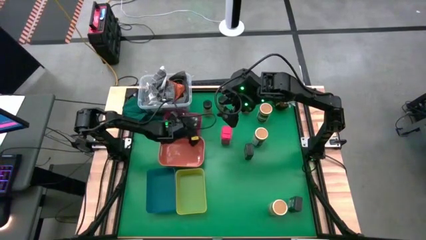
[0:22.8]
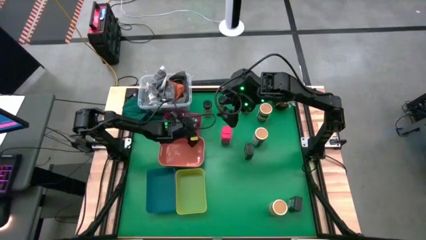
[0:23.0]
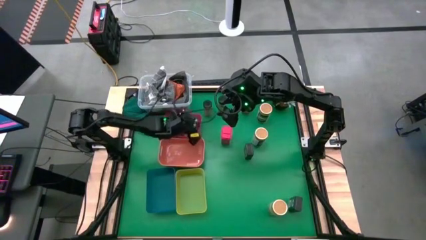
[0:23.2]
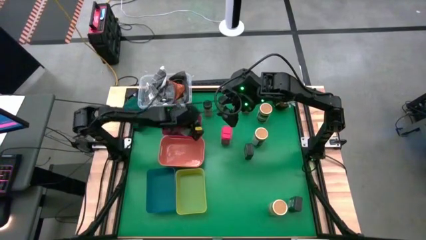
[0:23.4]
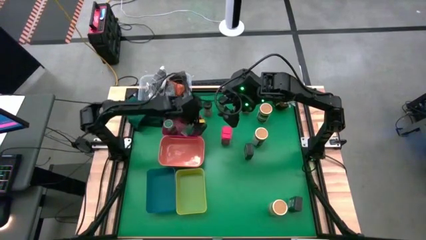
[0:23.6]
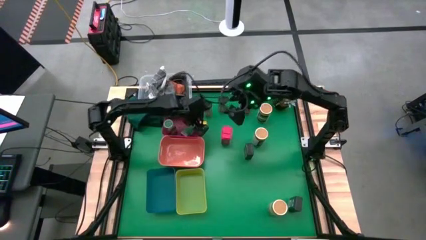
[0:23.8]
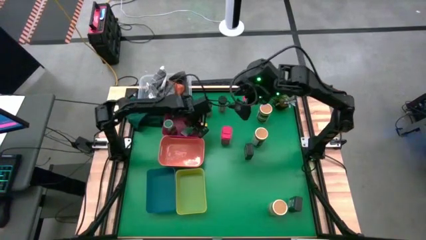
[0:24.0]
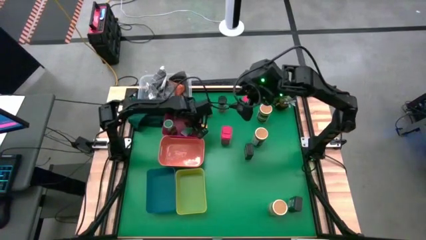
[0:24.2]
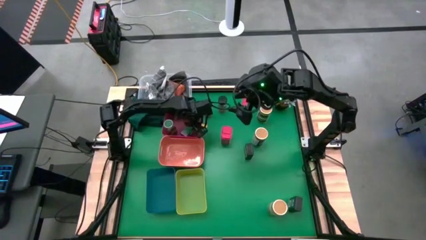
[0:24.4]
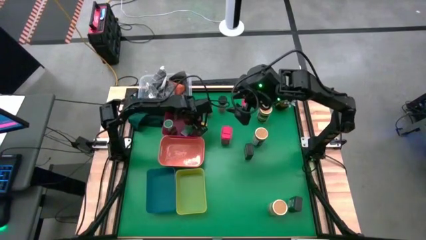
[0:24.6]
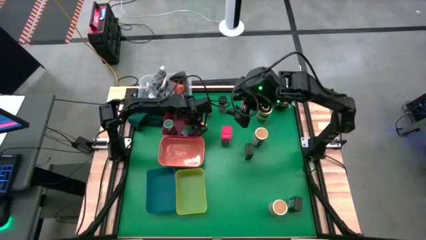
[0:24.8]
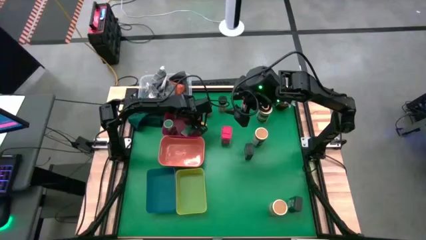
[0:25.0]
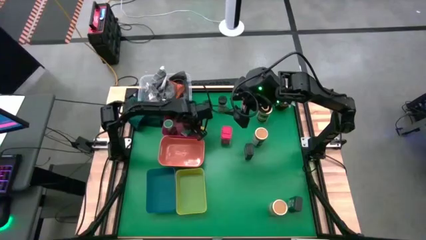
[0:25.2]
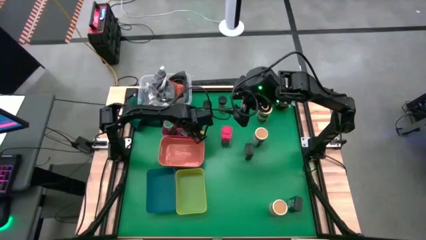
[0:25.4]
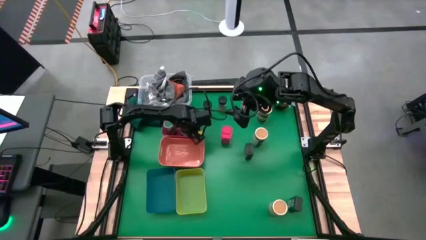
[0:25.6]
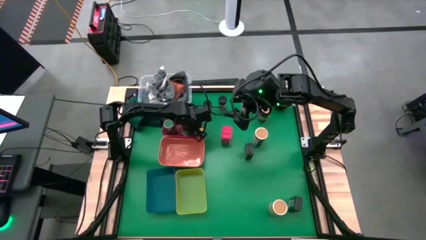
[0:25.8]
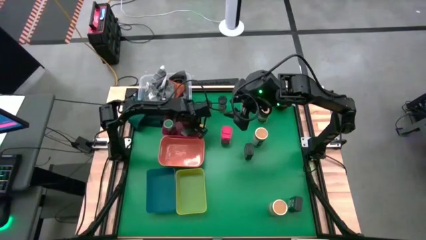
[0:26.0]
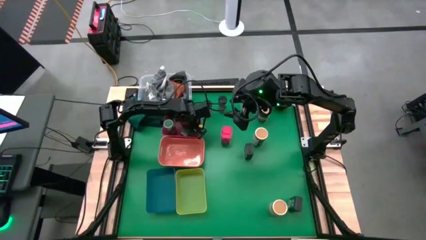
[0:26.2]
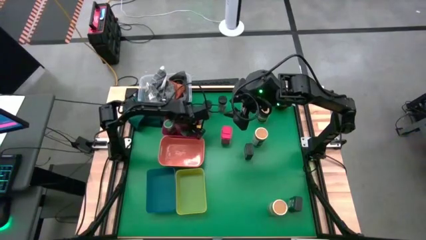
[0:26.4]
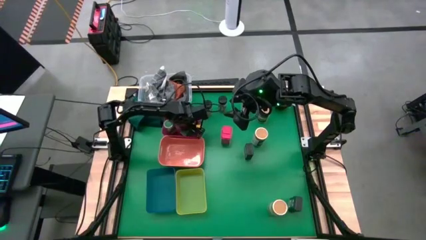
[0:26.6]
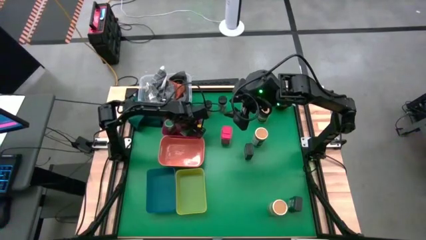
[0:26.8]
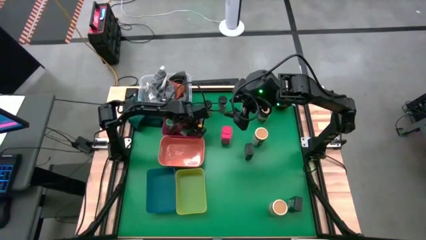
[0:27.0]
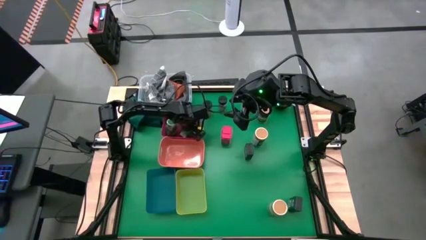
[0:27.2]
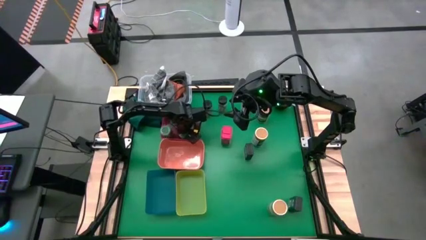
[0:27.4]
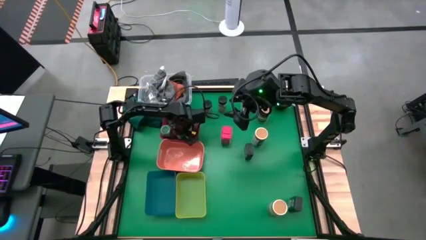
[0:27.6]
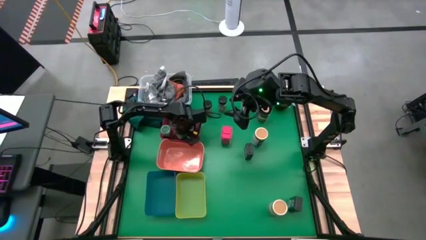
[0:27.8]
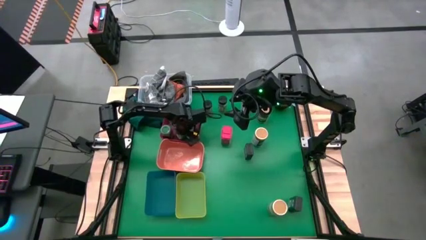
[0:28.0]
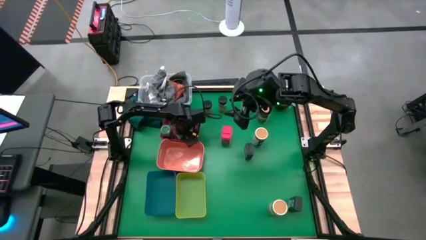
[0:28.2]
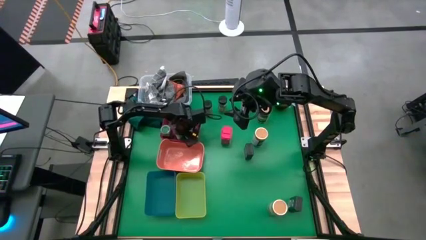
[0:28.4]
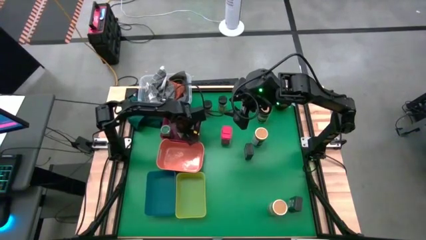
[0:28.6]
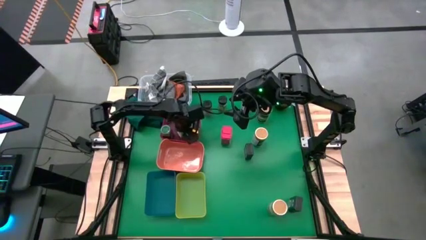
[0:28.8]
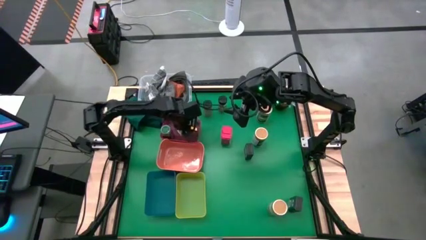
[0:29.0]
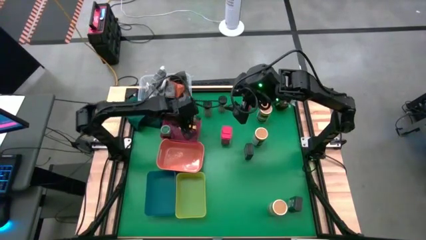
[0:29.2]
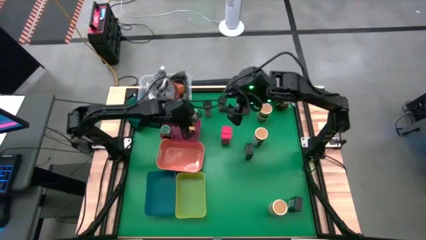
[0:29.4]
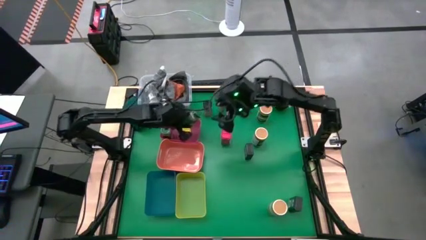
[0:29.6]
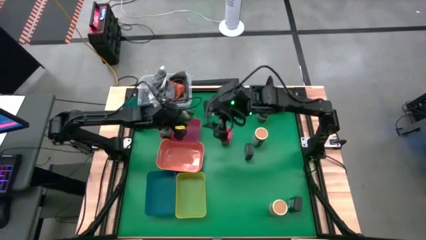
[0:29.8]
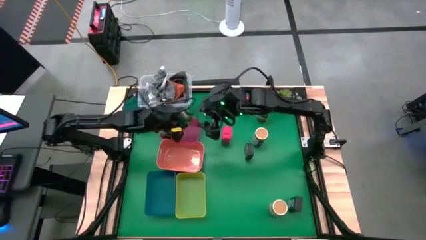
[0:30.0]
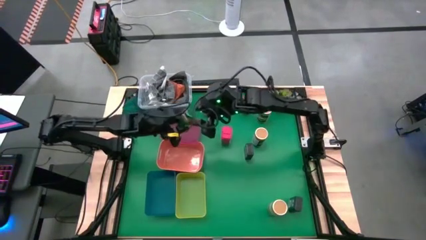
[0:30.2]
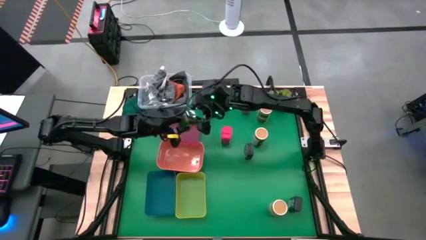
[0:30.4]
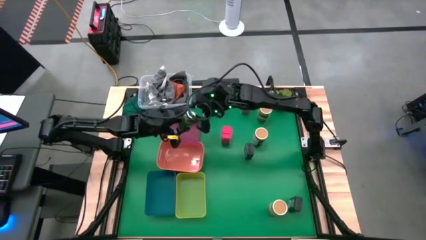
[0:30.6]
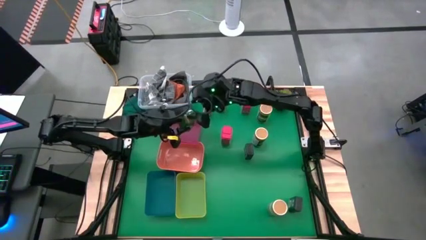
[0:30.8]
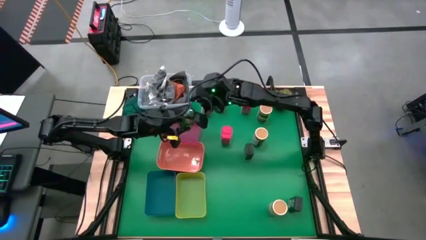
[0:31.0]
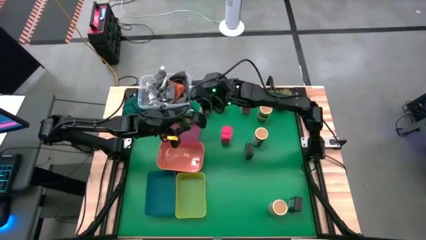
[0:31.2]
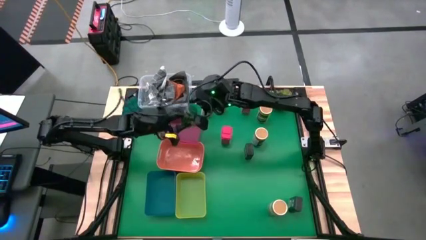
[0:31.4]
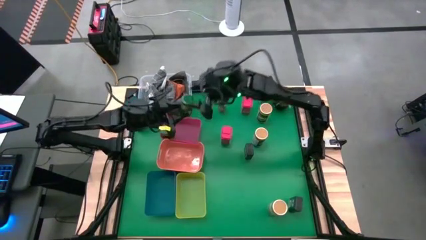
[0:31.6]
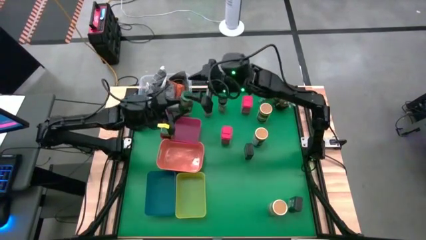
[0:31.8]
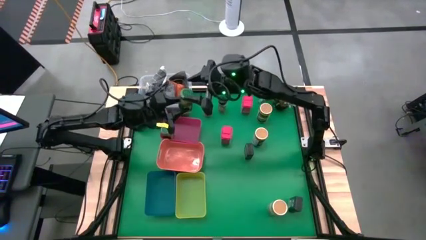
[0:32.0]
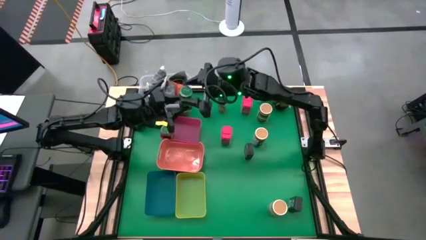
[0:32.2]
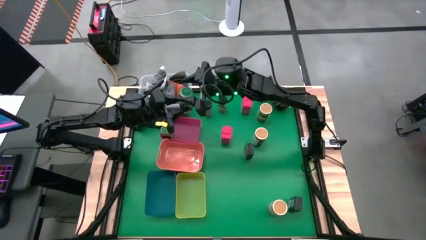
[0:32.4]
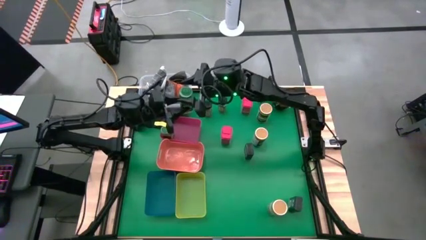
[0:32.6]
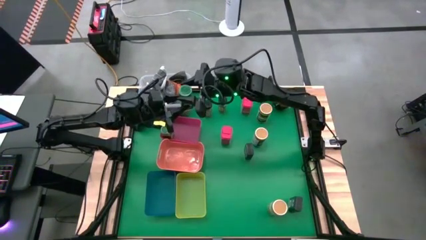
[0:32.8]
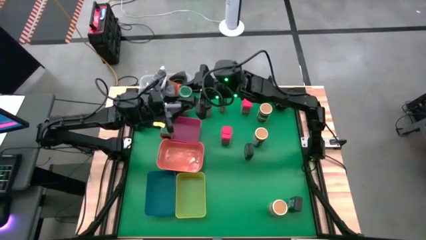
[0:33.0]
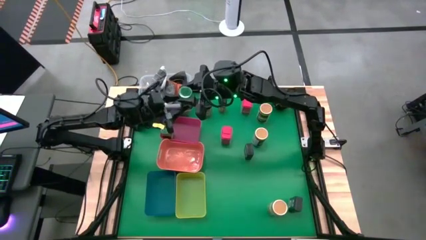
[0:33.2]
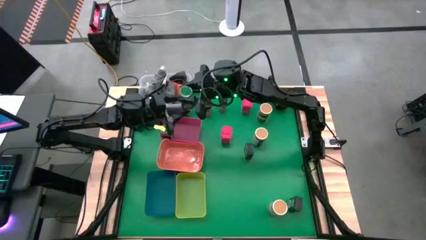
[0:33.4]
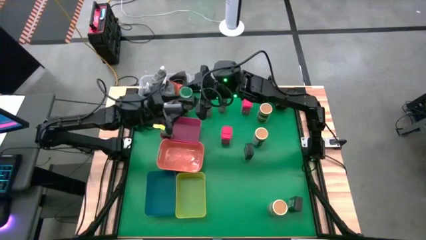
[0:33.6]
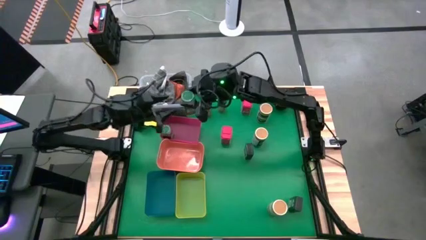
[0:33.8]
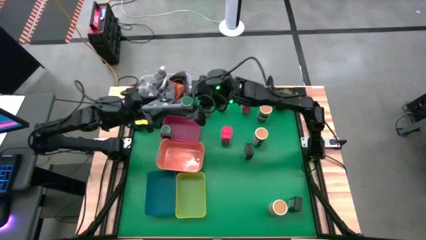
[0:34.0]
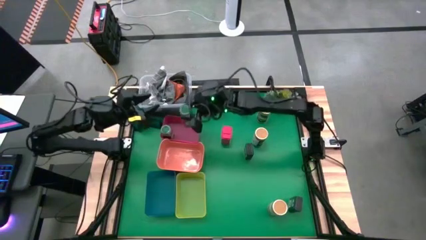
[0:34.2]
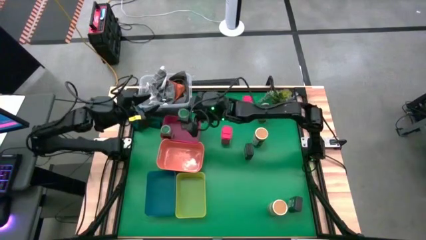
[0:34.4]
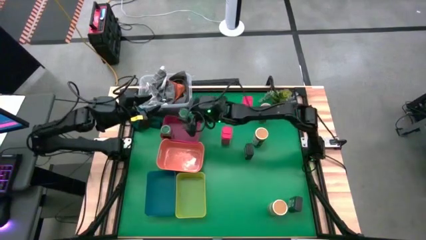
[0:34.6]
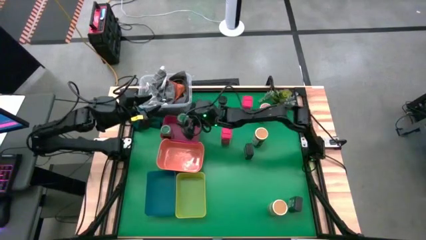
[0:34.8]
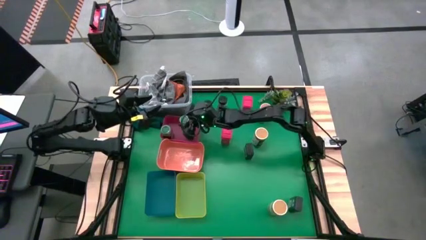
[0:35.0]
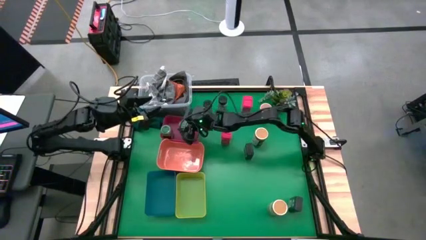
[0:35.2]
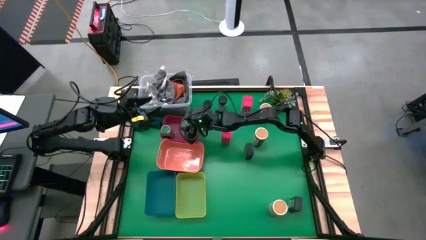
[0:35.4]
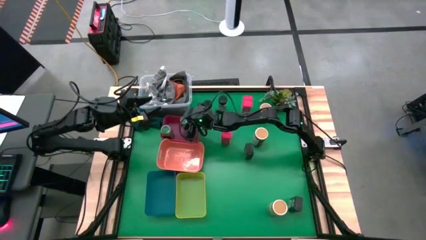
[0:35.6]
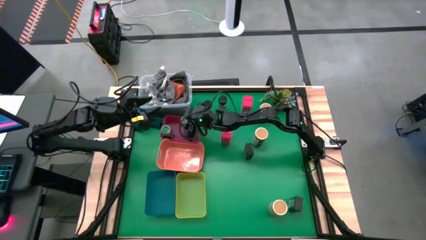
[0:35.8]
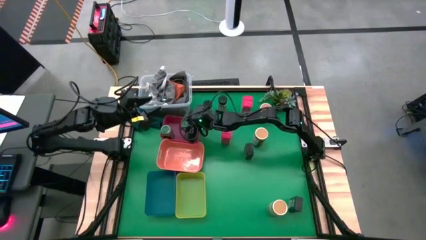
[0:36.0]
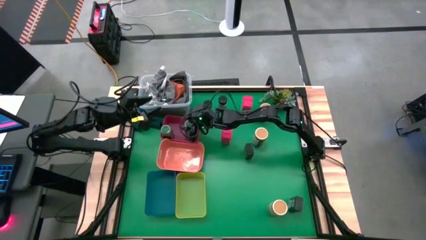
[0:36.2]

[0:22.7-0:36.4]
Task: Sort spices by type
Put the green seasoning bottle into the red bin

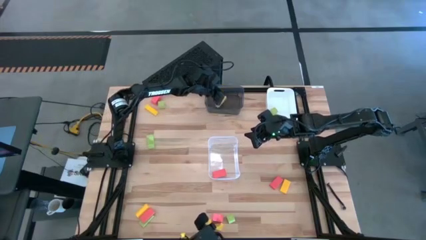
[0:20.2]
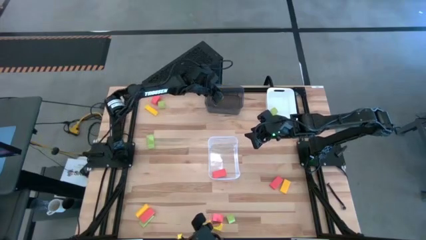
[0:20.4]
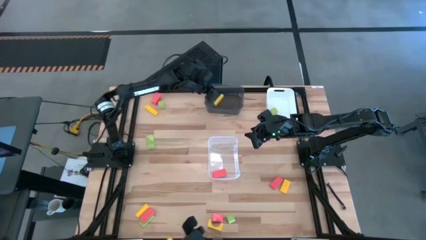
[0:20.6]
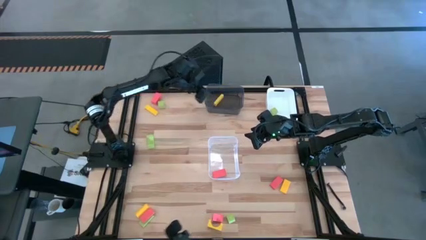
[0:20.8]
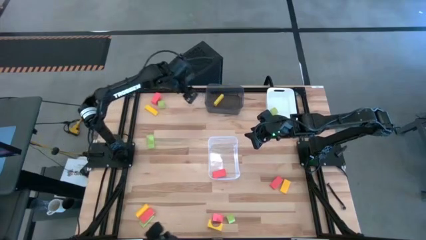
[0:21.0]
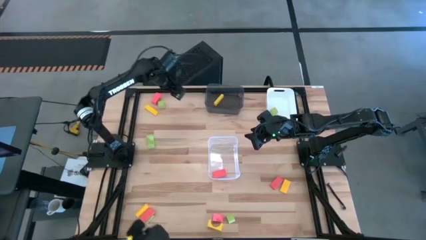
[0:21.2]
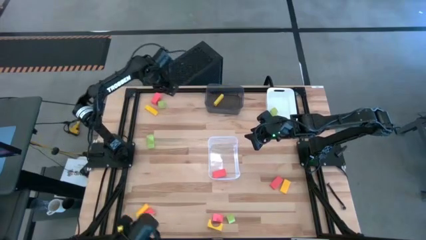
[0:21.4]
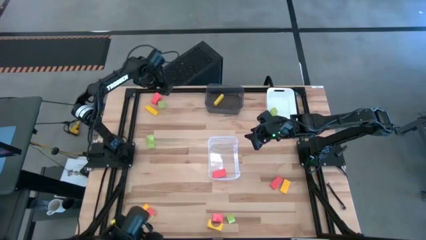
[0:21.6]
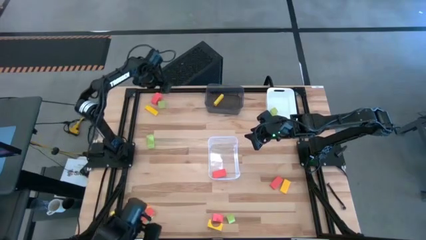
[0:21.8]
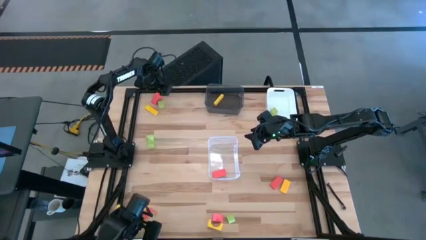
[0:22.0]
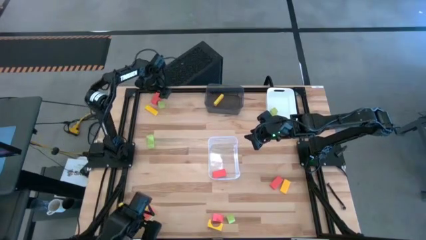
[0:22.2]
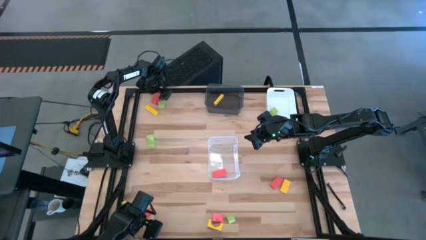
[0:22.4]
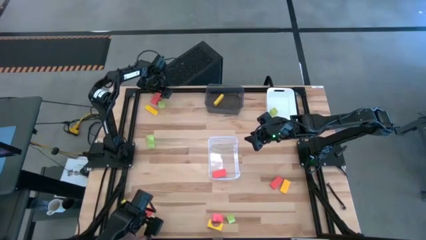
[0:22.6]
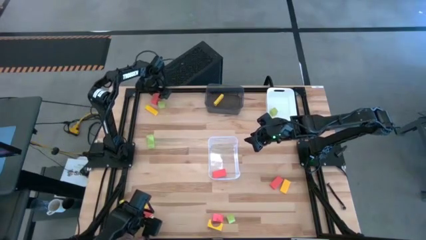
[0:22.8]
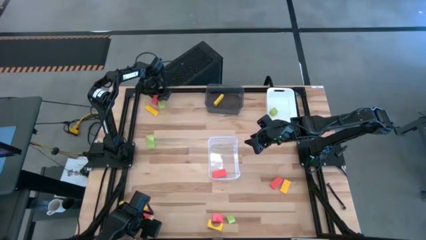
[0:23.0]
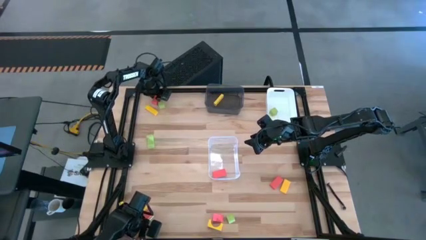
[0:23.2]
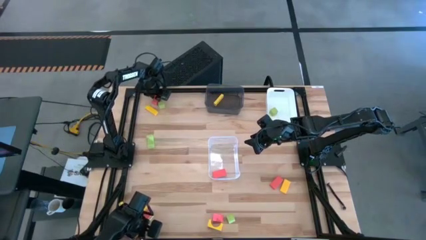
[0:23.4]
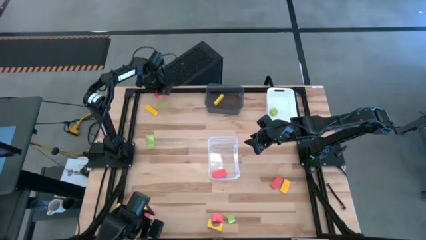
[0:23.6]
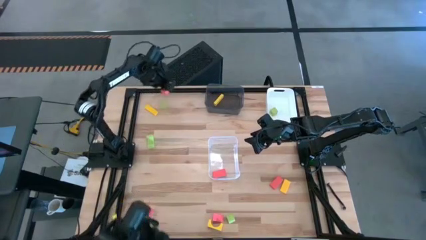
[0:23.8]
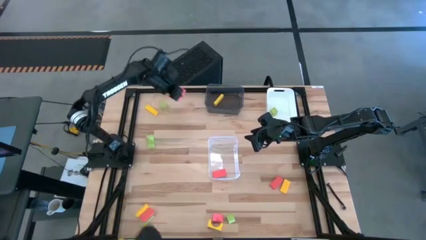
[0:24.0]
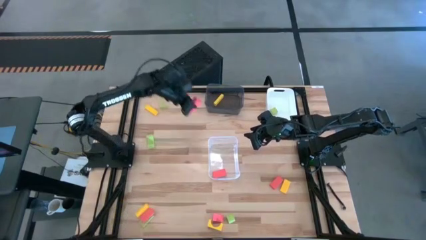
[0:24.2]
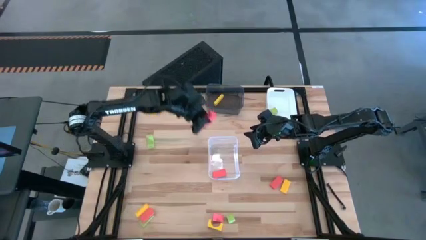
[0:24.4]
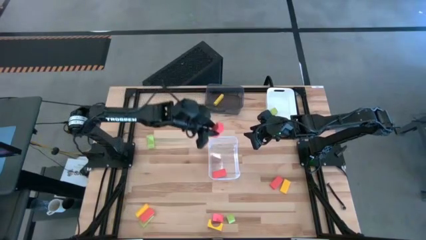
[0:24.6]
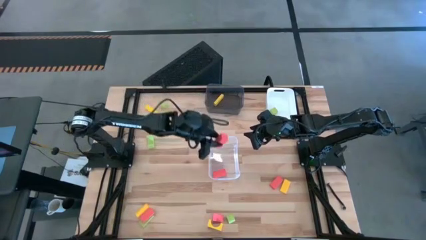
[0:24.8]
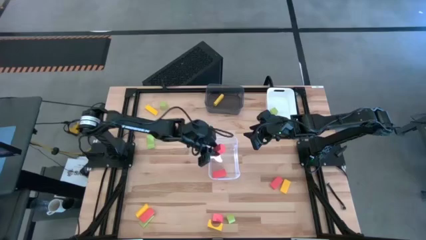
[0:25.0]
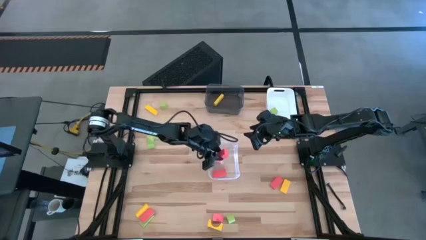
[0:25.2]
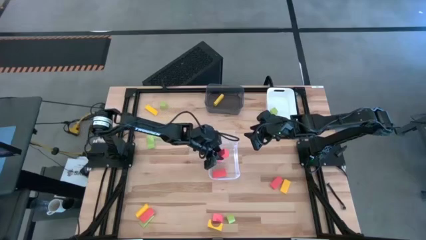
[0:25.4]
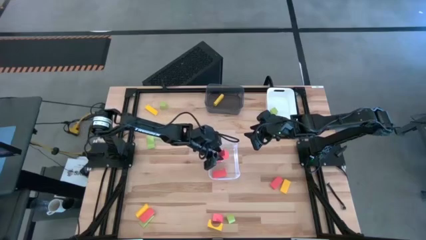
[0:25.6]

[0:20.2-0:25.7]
Task: Sort & place blocks by color
Put the pink block into the transparent bin
